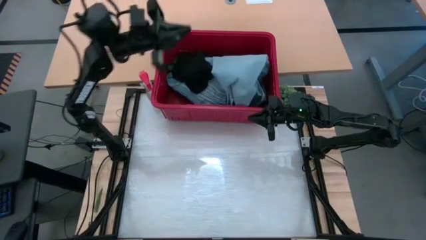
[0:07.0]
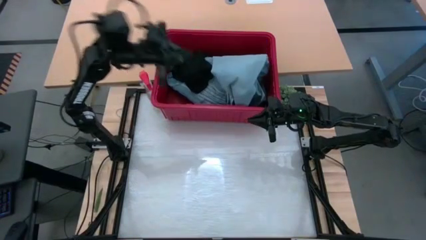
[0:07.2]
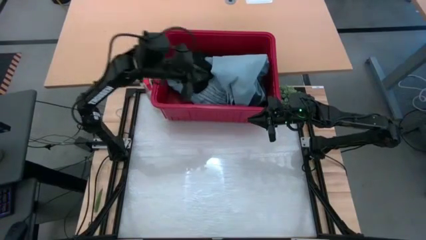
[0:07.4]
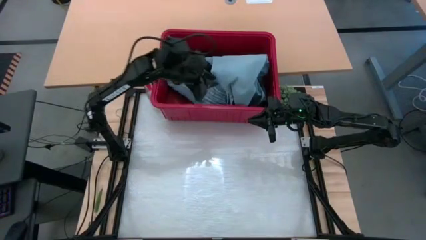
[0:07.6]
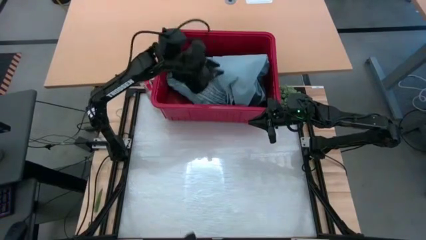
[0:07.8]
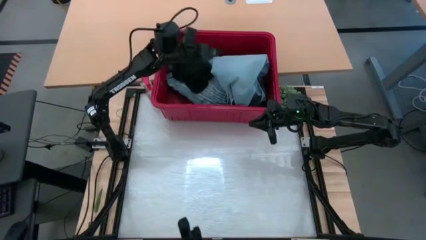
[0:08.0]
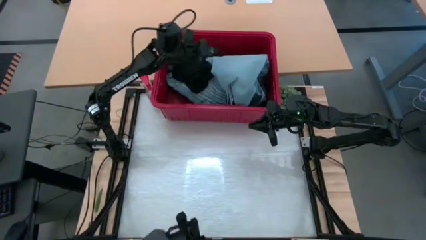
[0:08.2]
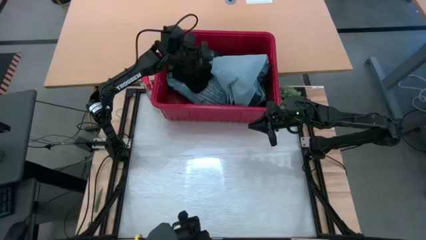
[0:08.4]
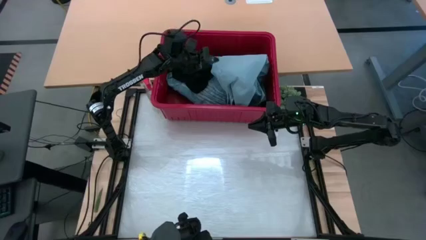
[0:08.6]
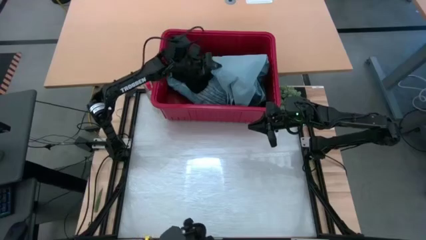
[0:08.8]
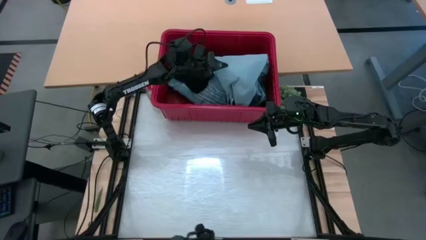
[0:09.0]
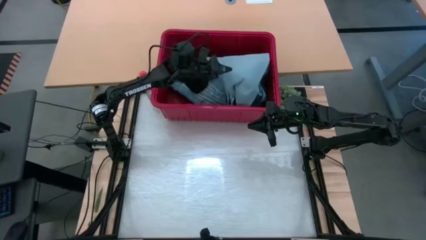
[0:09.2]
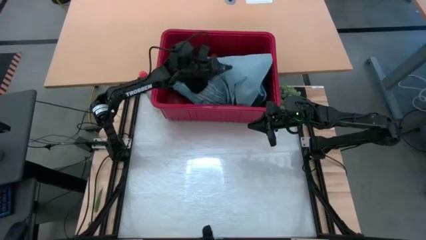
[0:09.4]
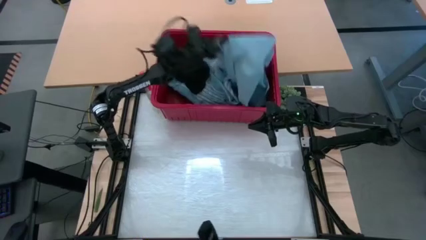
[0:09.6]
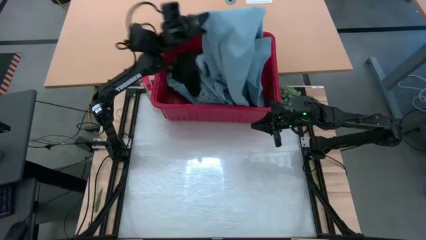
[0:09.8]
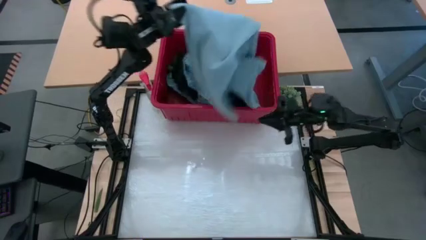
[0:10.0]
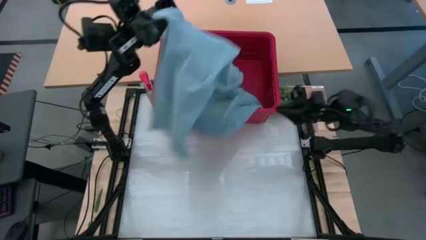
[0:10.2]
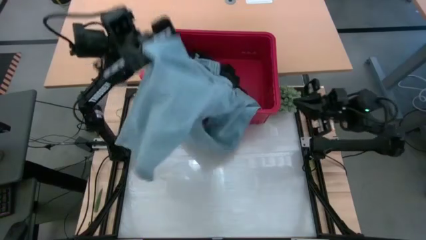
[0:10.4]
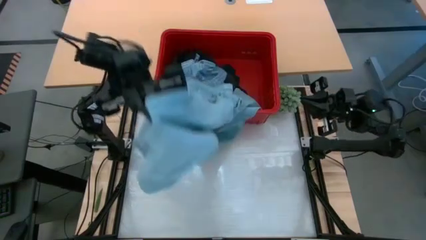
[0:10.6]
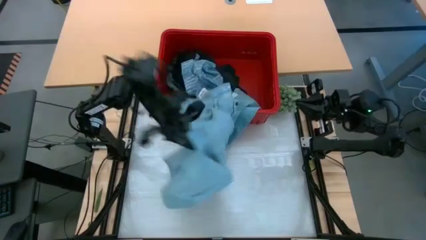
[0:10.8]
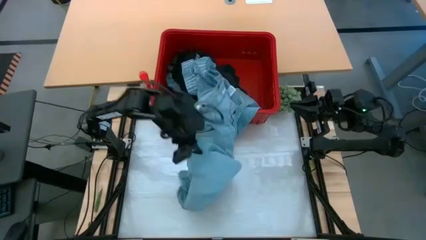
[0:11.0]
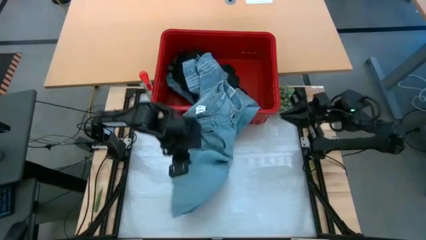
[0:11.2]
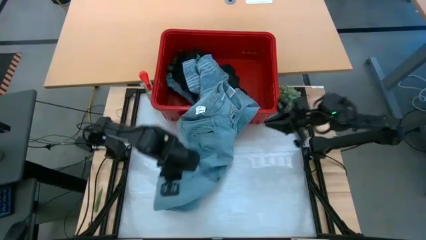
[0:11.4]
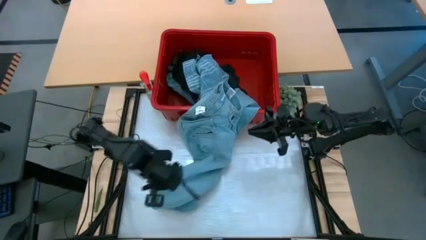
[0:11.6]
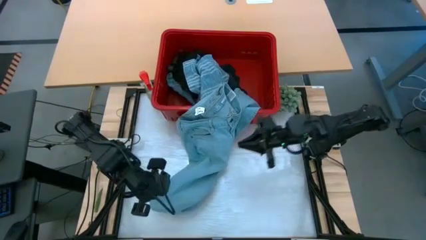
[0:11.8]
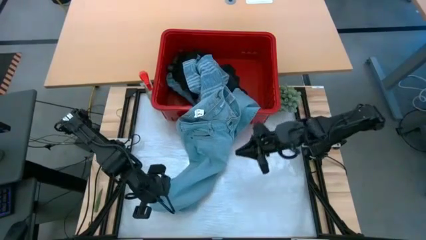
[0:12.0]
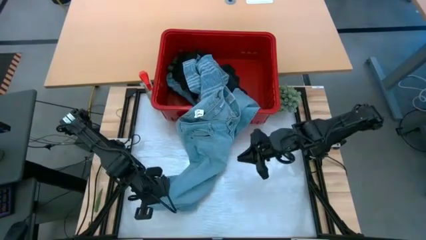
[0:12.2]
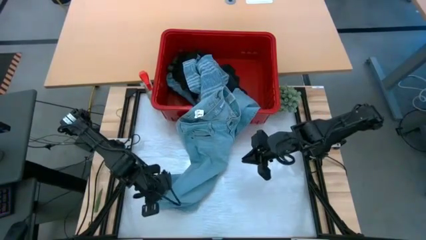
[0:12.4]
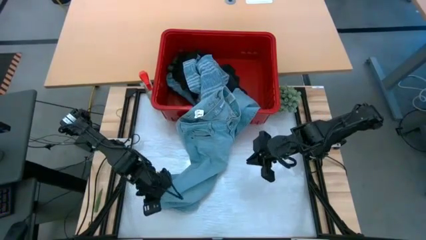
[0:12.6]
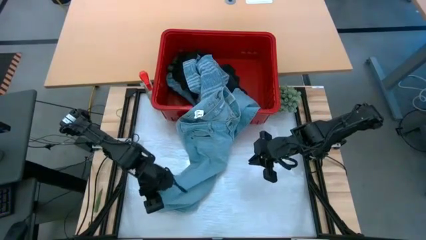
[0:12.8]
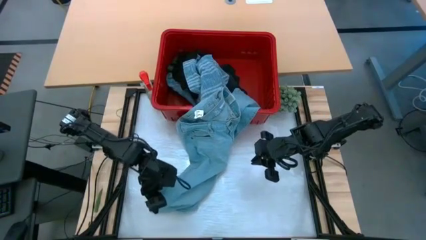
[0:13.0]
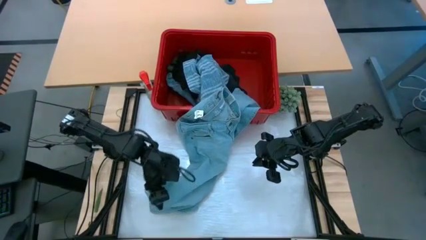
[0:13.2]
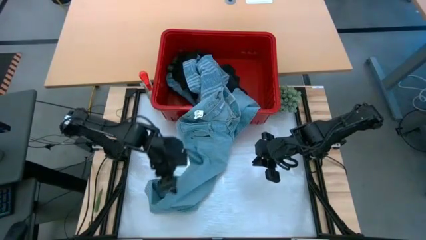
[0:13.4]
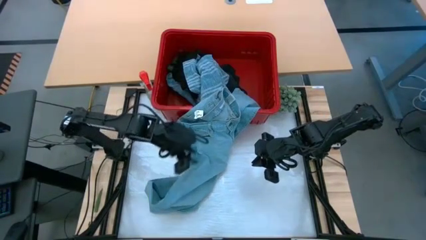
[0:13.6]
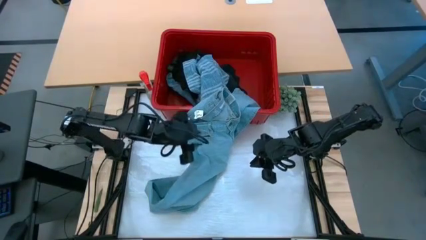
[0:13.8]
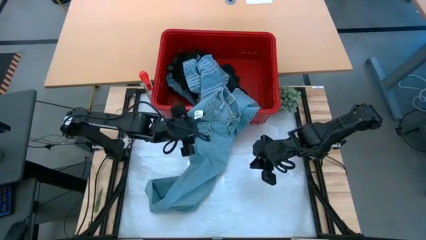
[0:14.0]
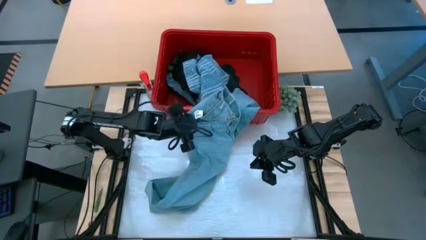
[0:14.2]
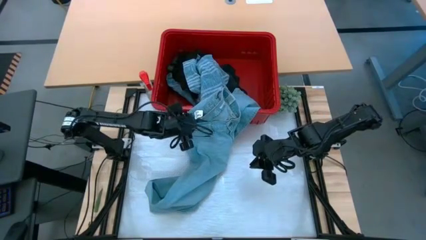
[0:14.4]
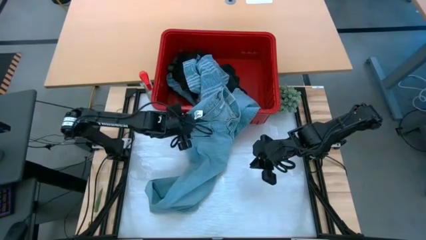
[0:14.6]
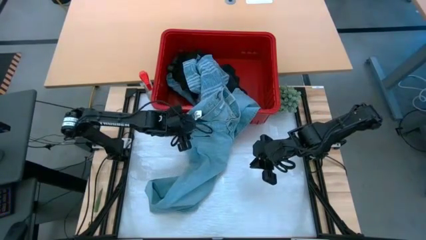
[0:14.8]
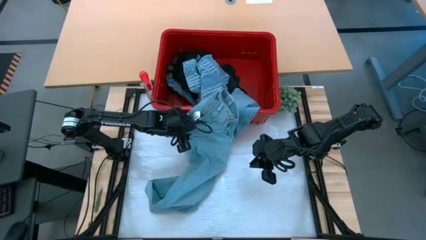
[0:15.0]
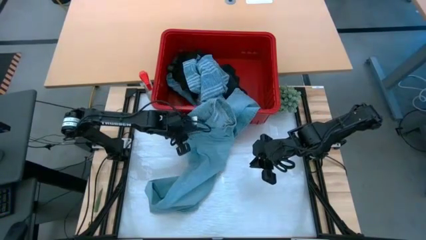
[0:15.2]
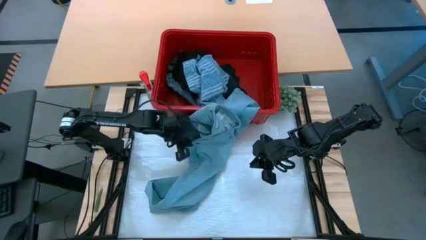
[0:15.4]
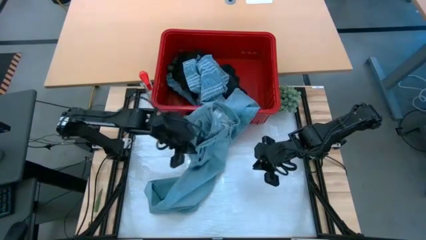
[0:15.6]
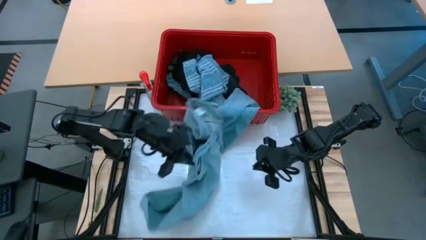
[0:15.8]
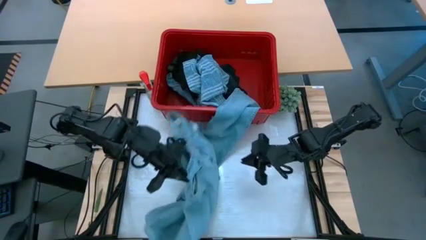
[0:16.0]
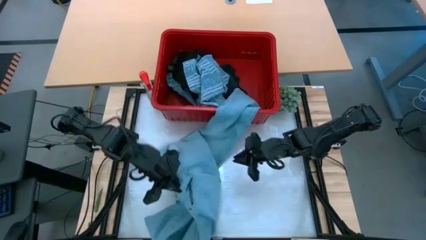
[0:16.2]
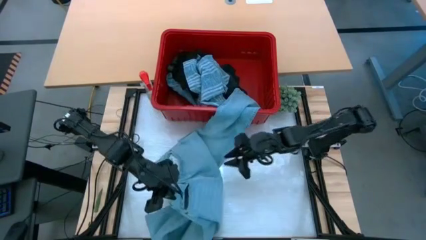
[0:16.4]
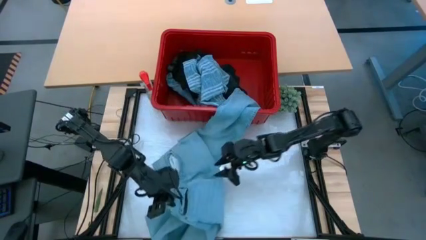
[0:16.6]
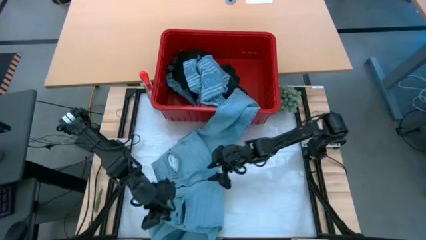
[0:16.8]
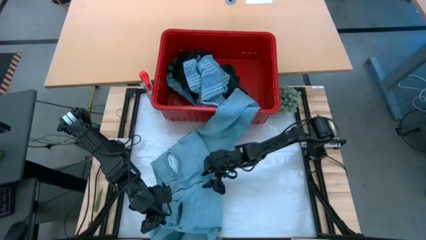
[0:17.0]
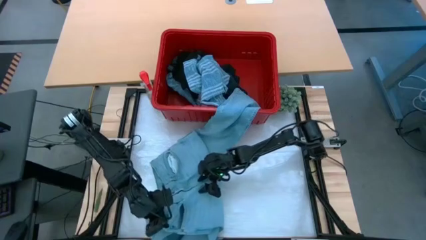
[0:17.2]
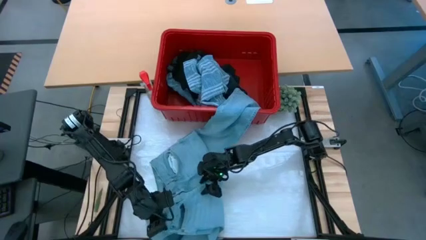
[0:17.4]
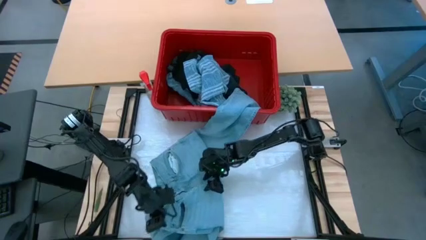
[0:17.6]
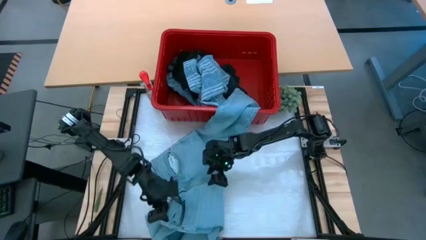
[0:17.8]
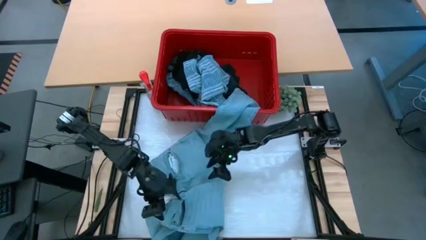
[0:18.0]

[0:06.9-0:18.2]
Task: Fold Laundry from Bin
Remove the light blue pants from the red laundry bin
